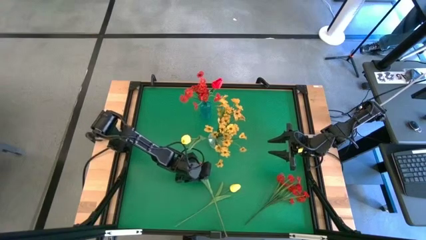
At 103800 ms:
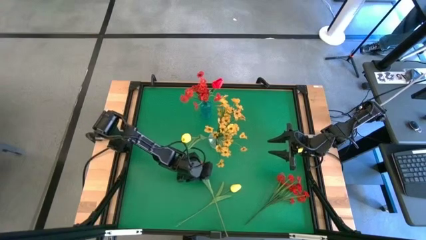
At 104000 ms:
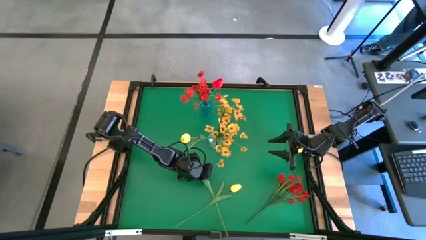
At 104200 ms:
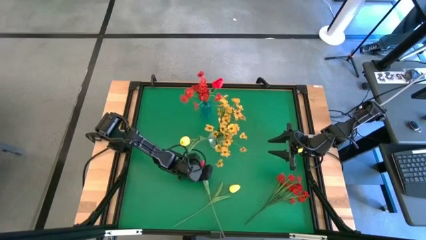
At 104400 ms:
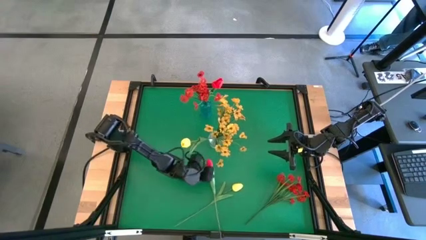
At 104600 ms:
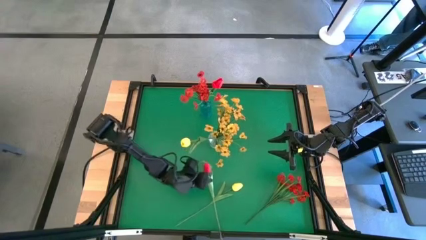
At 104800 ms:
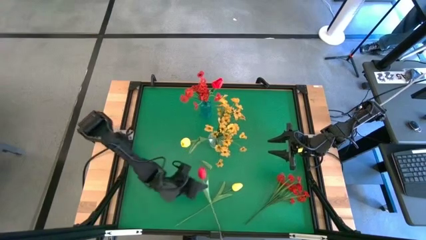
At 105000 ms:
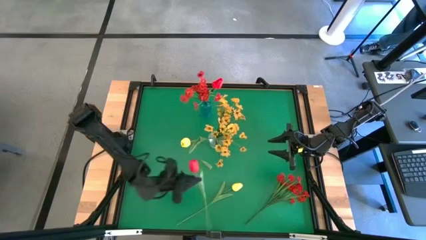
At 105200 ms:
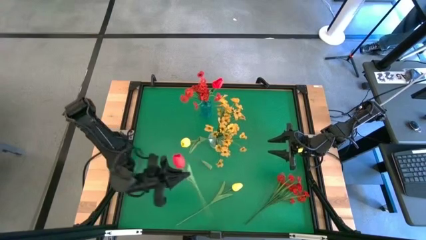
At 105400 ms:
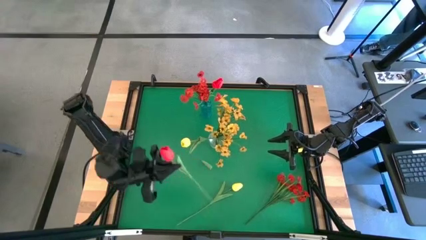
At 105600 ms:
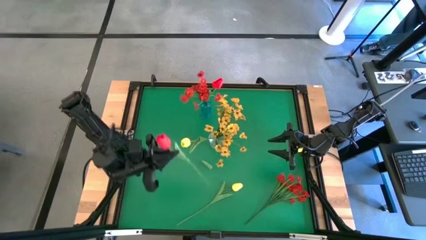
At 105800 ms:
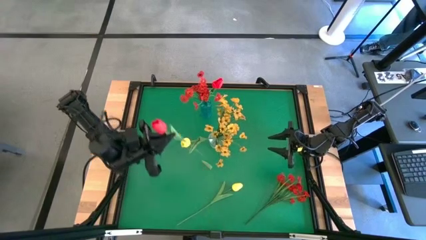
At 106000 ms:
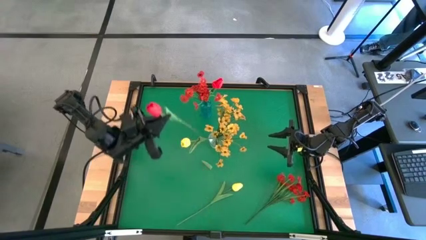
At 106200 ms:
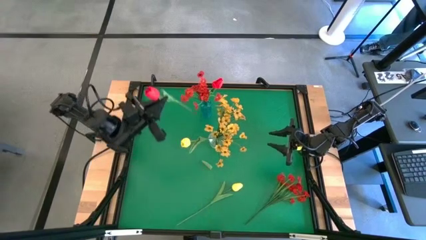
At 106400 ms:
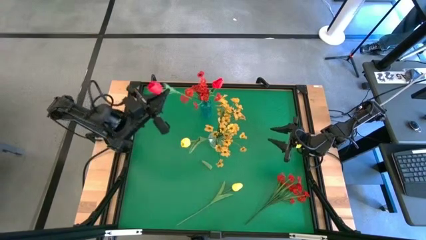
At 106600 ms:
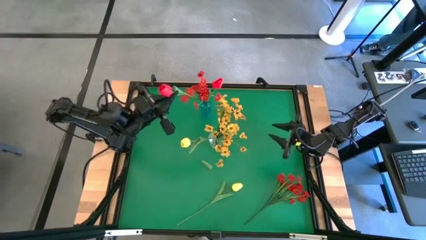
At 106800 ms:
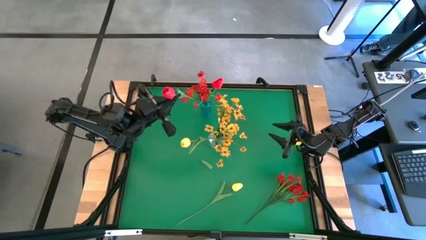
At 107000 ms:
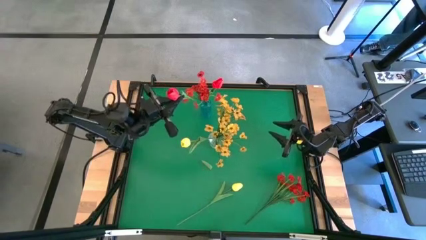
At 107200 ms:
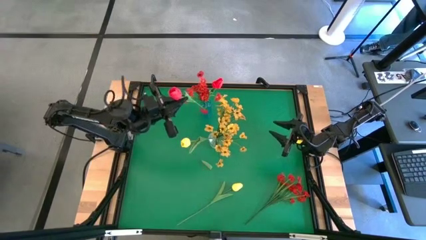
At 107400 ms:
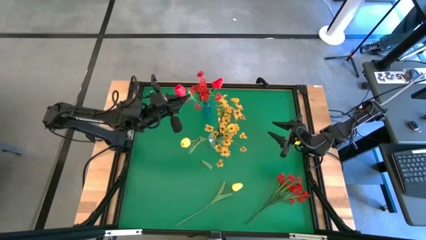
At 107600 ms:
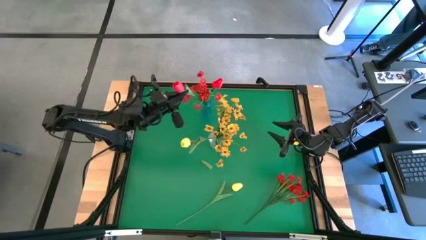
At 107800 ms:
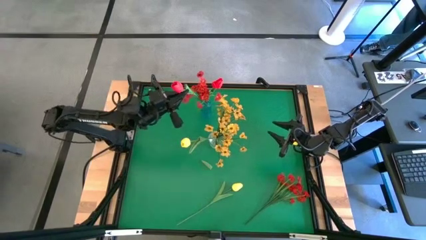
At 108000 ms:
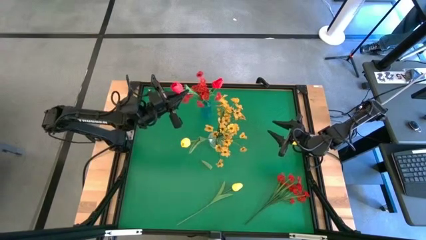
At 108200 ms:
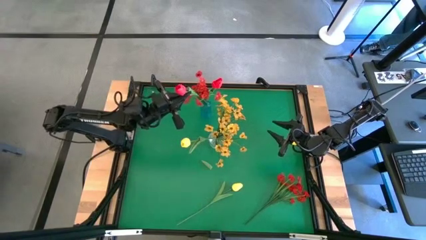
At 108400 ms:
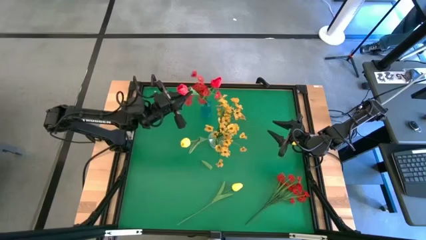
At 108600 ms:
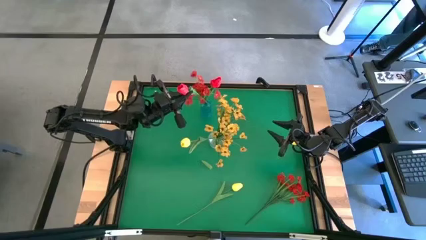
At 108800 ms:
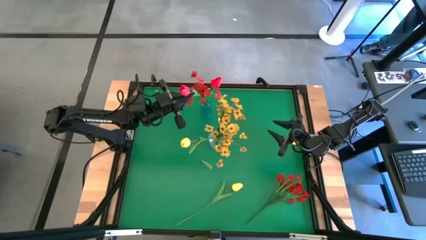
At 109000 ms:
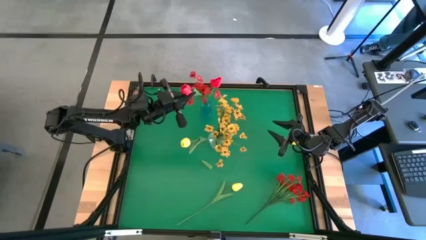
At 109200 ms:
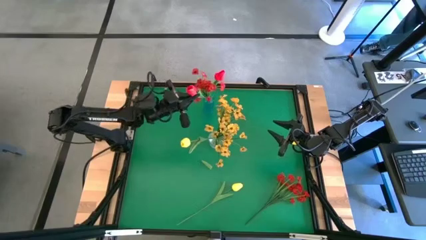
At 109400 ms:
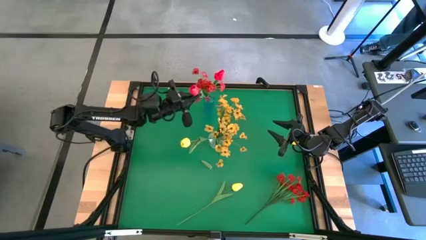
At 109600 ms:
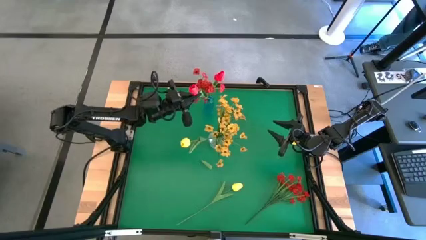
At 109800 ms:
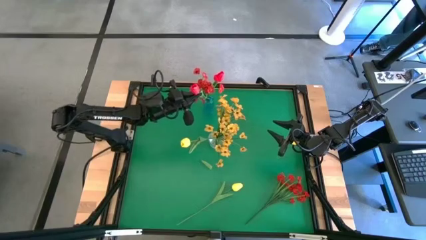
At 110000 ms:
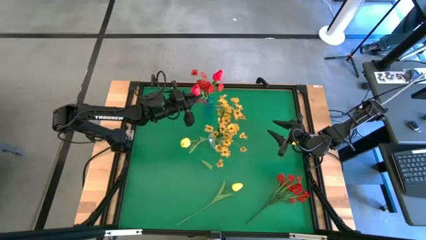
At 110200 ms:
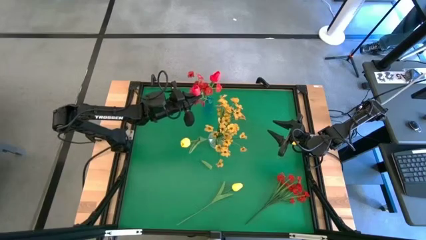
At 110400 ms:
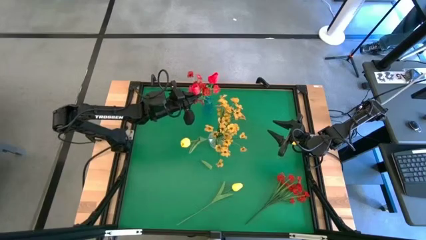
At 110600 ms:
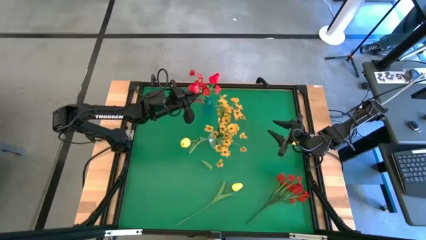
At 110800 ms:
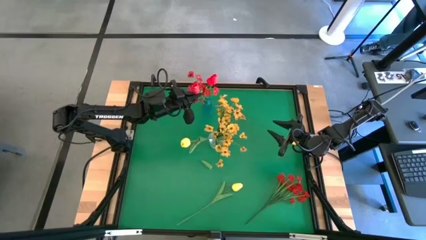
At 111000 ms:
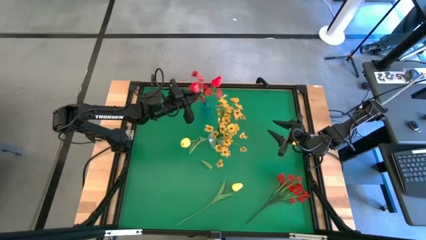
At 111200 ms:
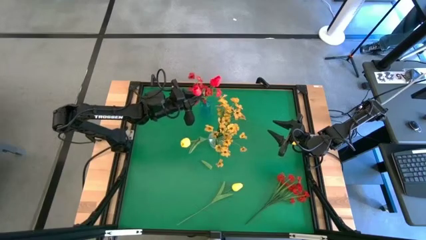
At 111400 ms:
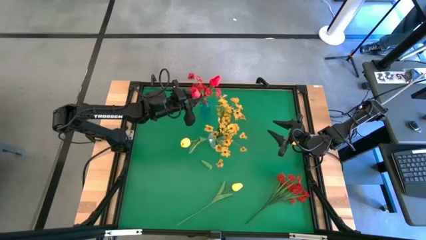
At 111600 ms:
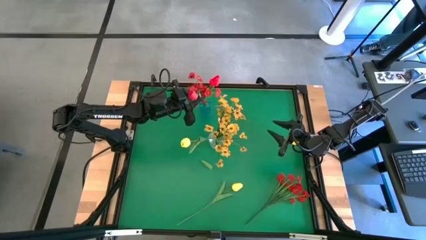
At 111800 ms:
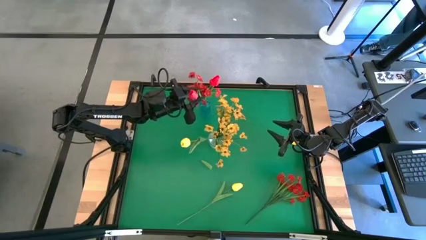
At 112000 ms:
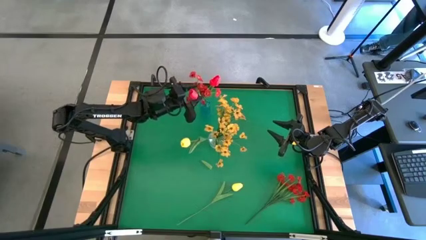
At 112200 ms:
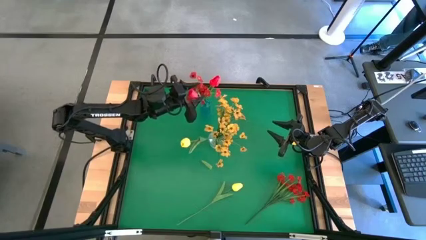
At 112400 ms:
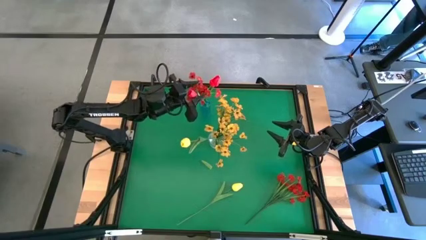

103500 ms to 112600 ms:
Task: Sort flowers into vase by color
Put the red flower into the blue vase
